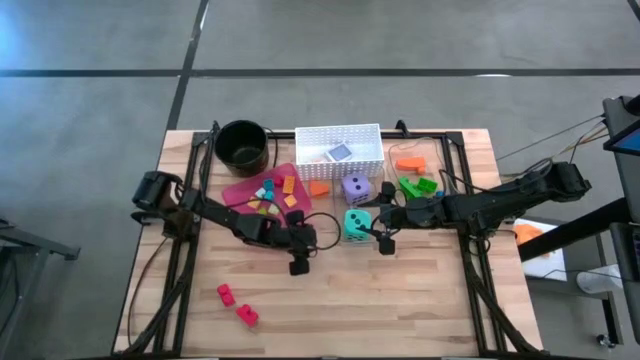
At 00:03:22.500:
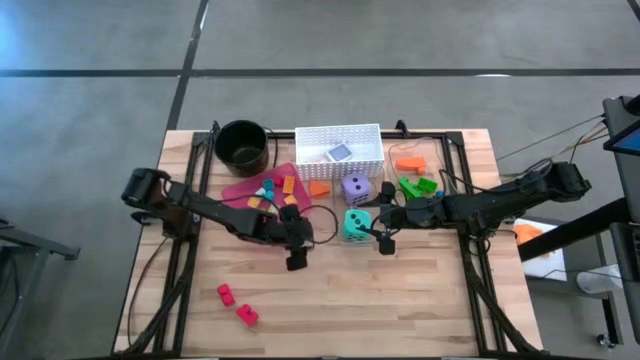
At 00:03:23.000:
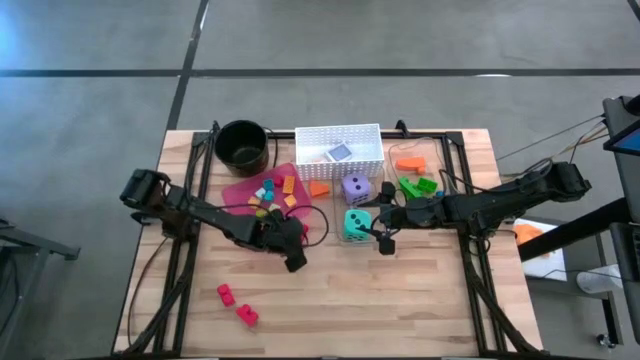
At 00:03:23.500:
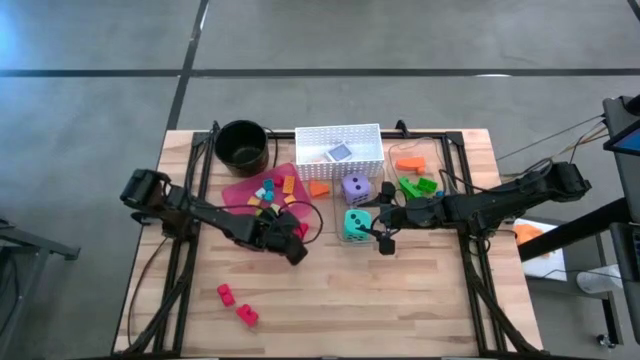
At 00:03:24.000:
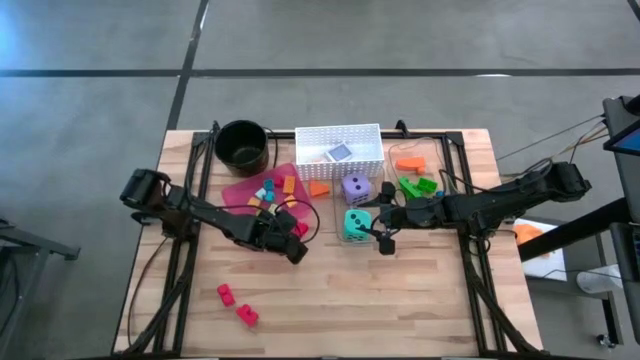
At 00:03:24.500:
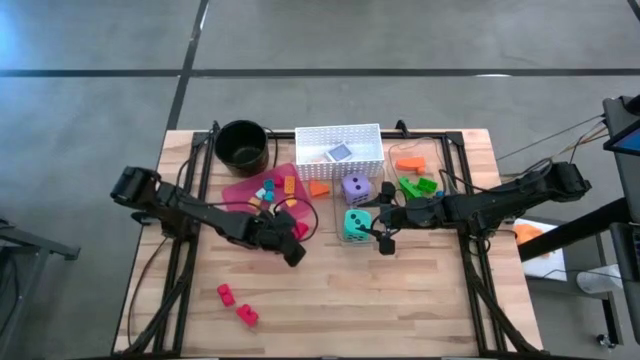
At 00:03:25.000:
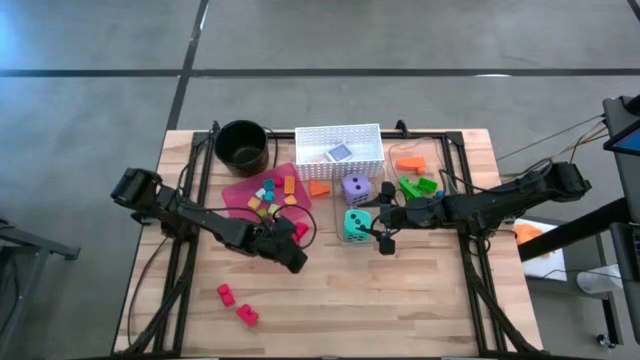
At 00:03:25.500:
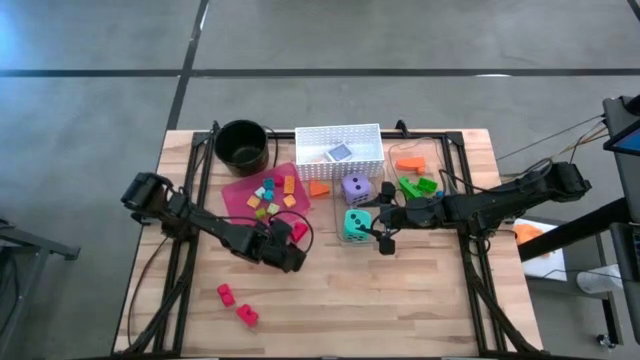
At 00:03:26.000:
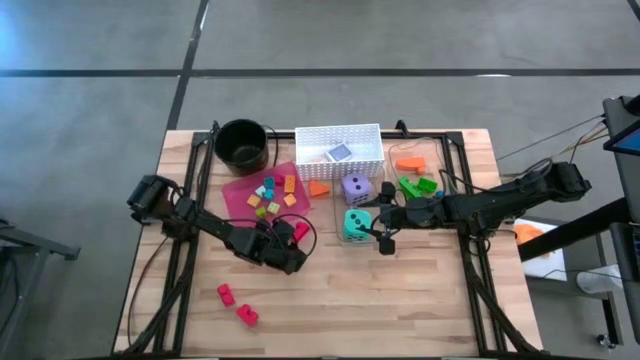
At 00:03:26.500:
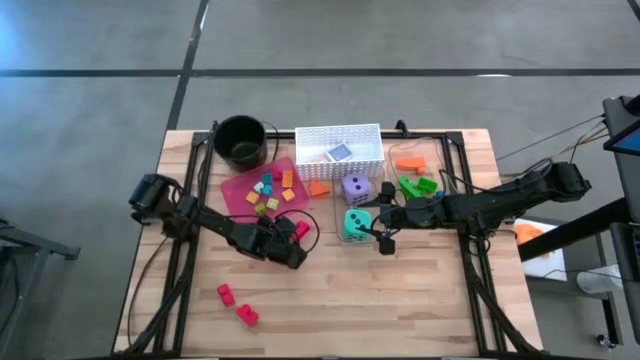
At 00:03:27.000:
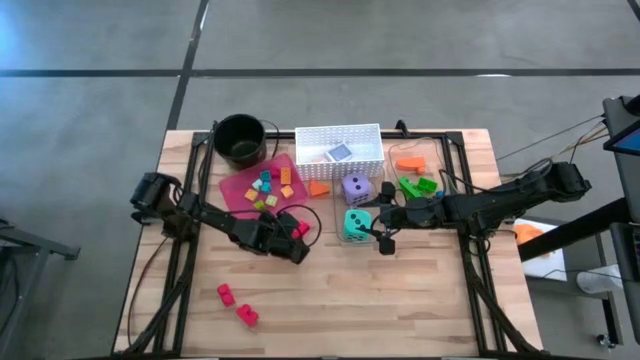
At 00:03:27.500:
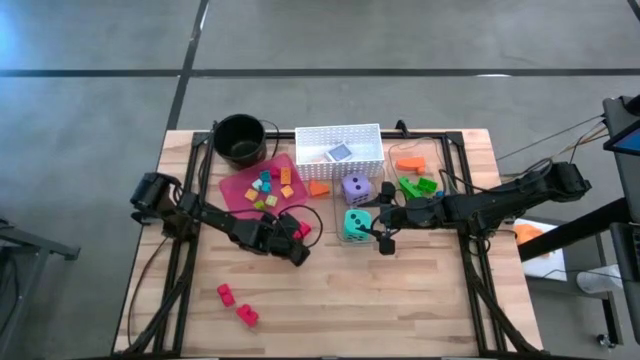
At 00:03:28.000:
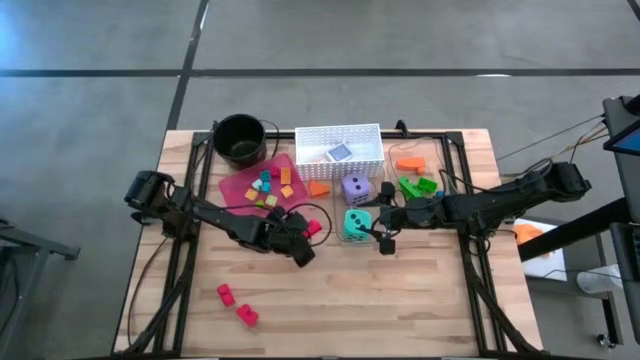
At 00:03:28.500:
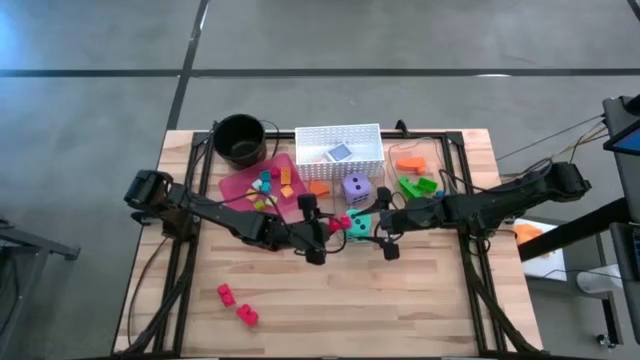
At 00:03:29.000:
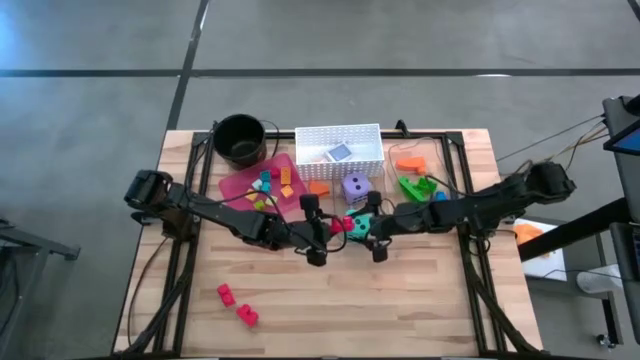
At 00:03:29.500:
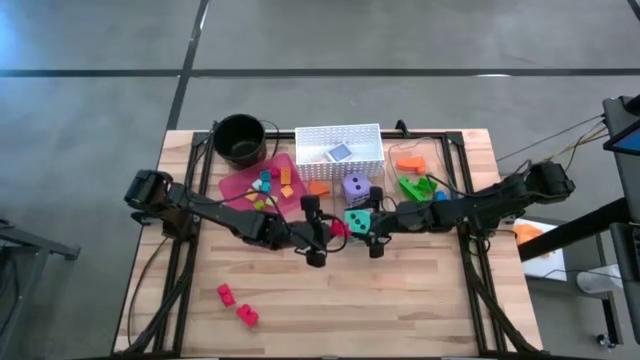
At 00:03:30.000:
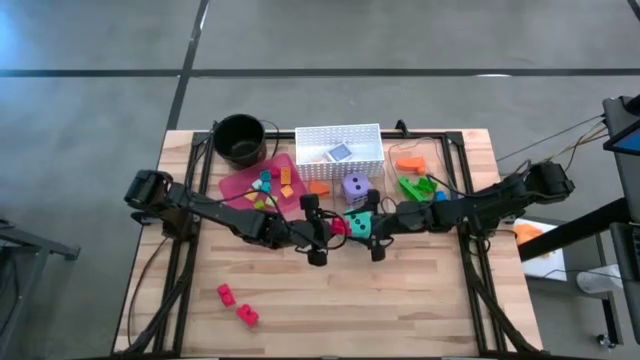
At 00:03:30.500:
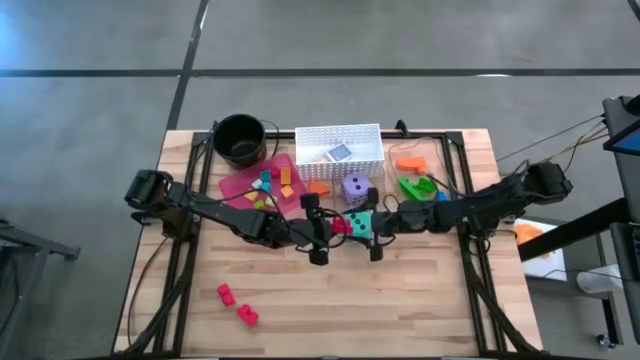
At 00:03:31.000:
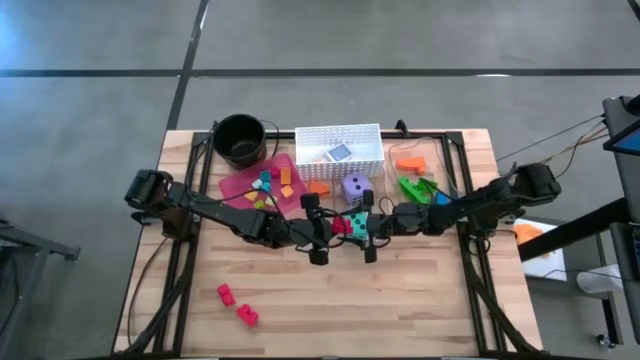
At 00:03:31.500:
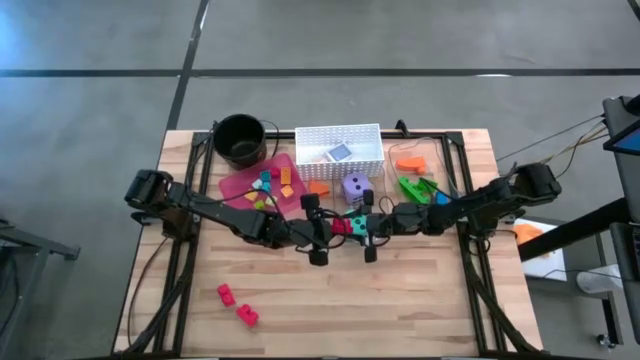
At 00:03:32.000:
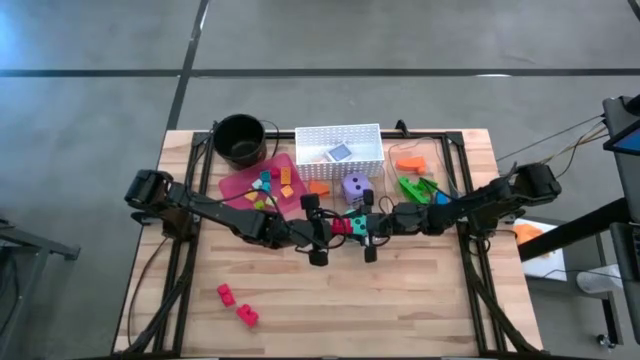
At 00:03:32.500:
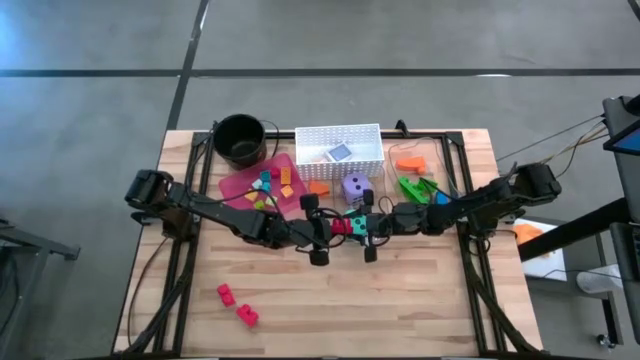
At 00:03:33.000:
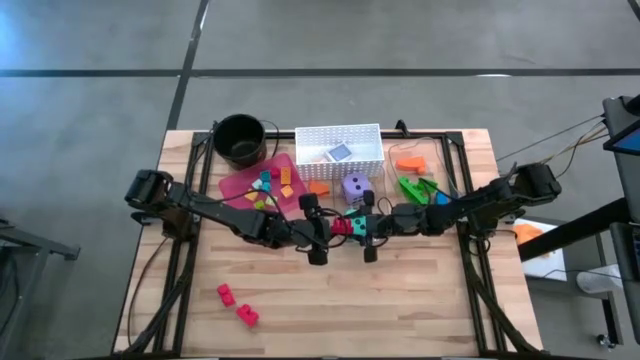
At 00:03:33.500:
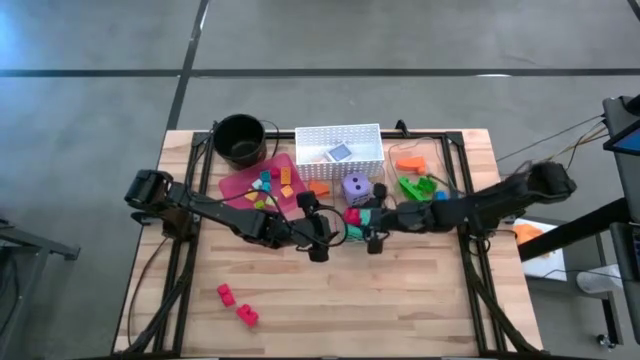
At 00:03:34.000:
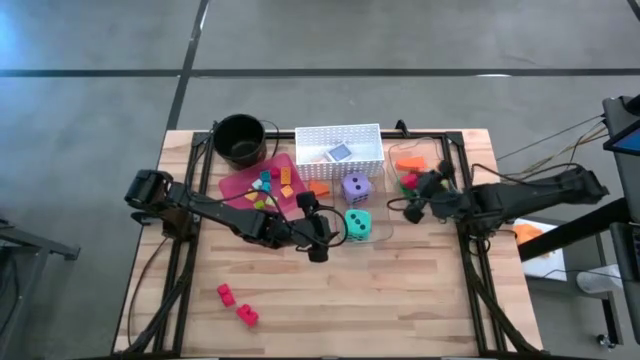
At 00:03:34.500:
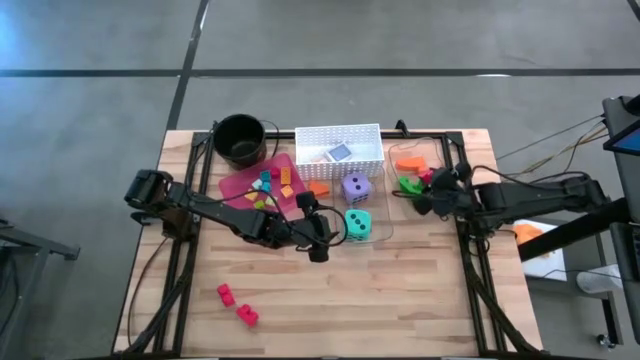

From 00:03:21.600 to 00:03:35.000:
Task: Pick & Place Toys
Put the top large red game piece into the top transparent bin

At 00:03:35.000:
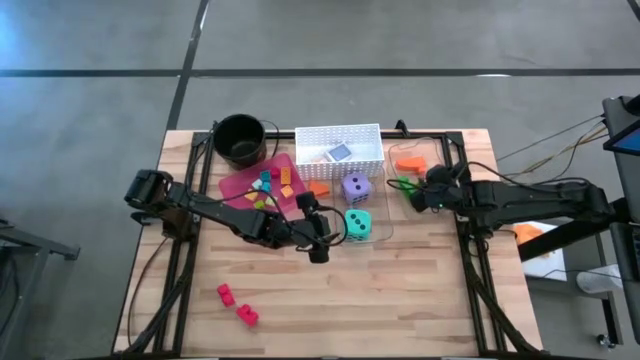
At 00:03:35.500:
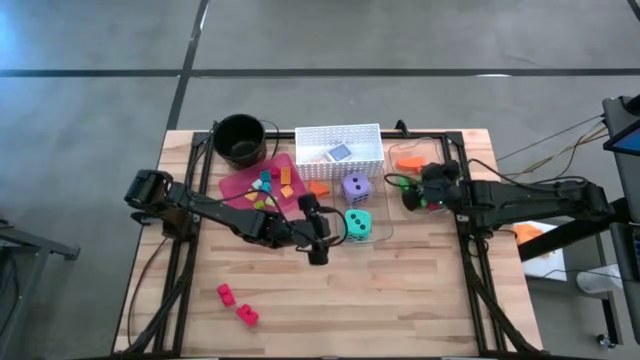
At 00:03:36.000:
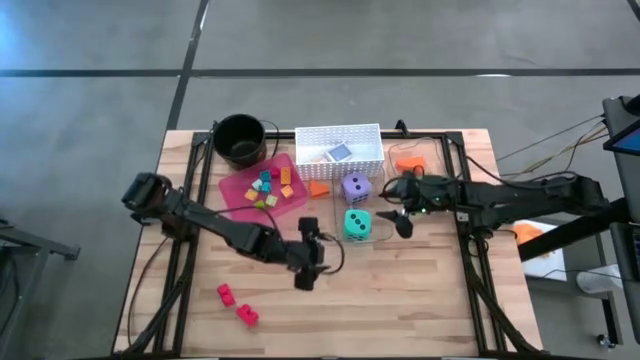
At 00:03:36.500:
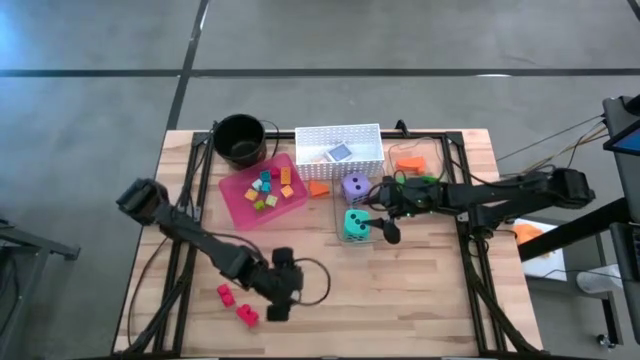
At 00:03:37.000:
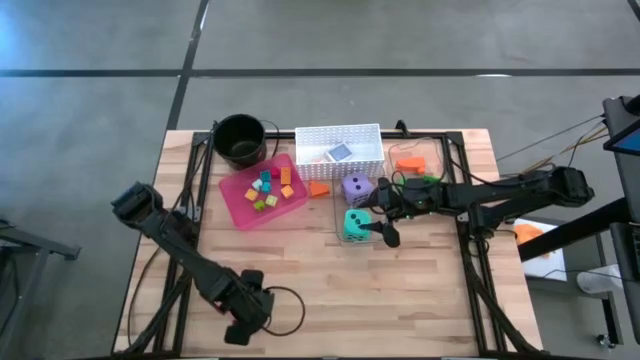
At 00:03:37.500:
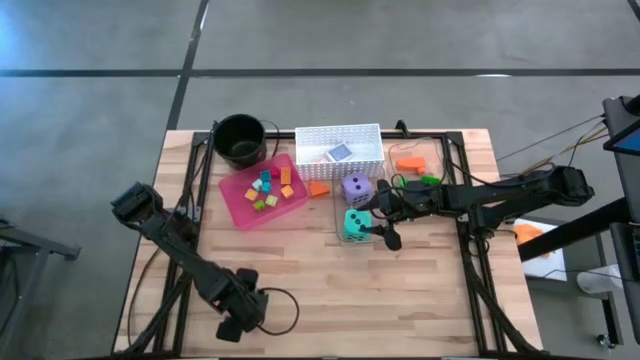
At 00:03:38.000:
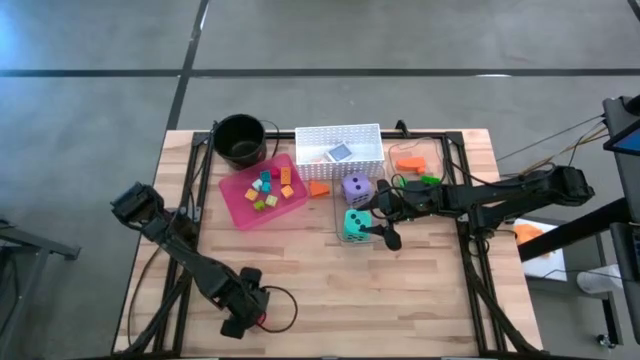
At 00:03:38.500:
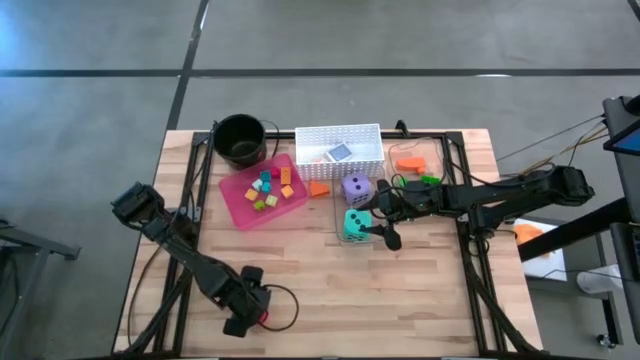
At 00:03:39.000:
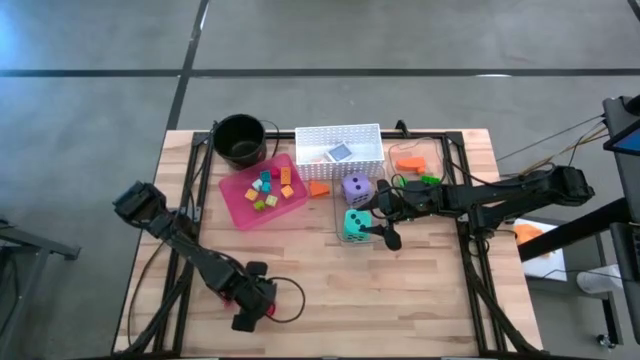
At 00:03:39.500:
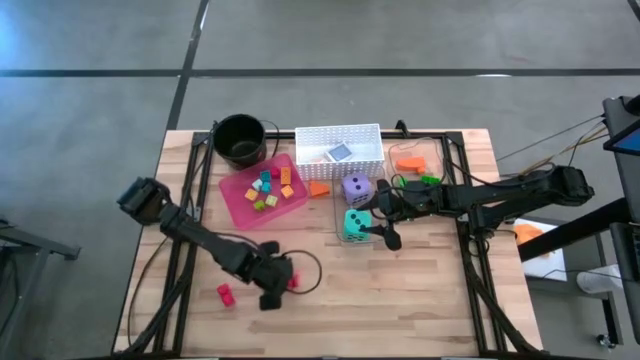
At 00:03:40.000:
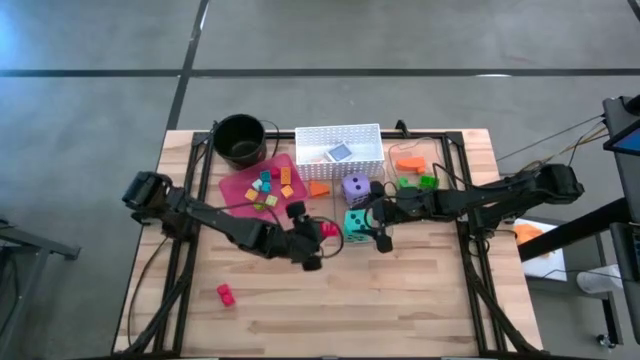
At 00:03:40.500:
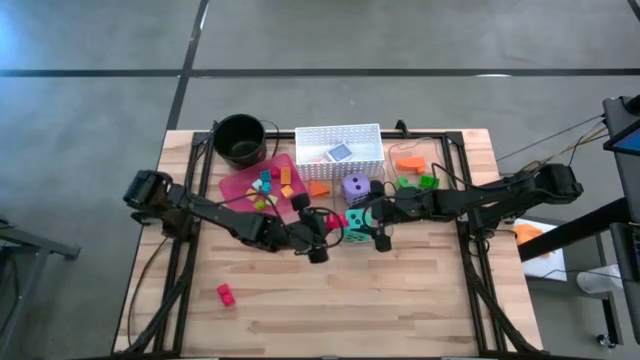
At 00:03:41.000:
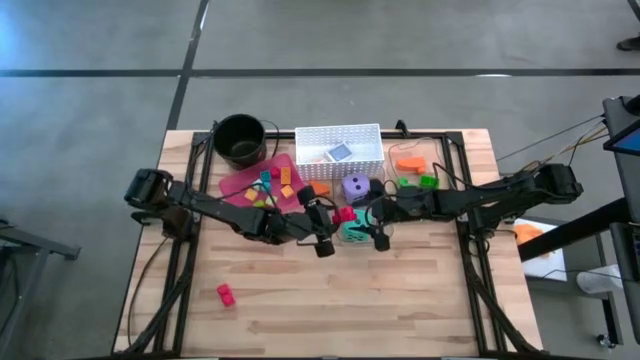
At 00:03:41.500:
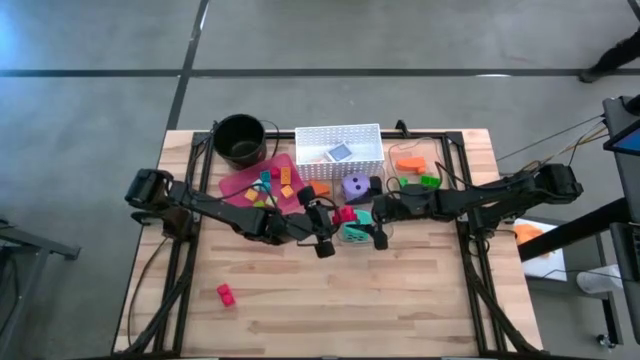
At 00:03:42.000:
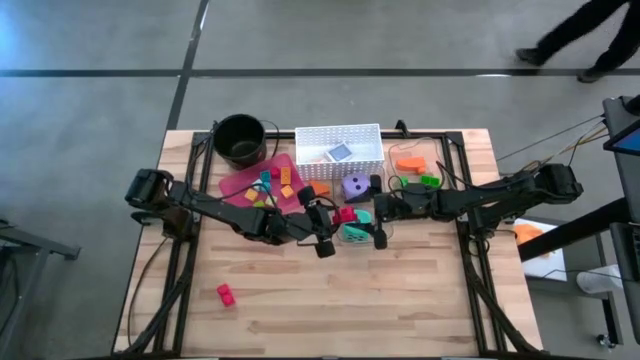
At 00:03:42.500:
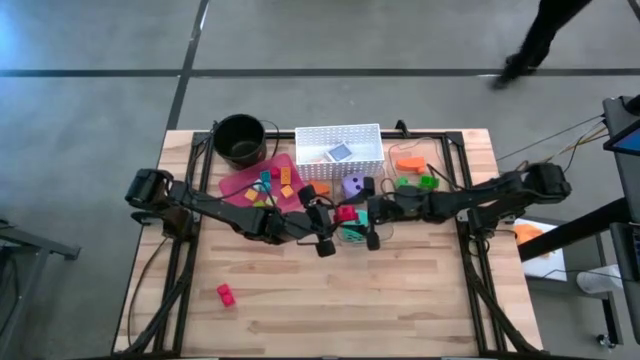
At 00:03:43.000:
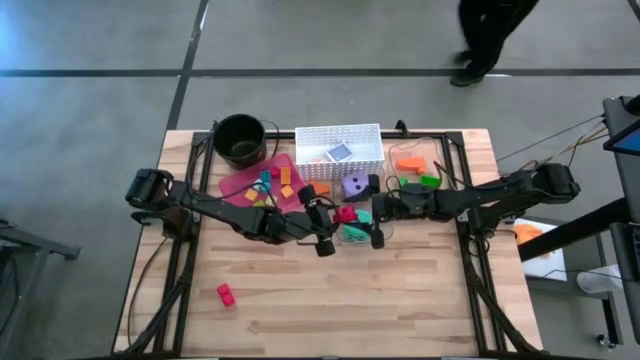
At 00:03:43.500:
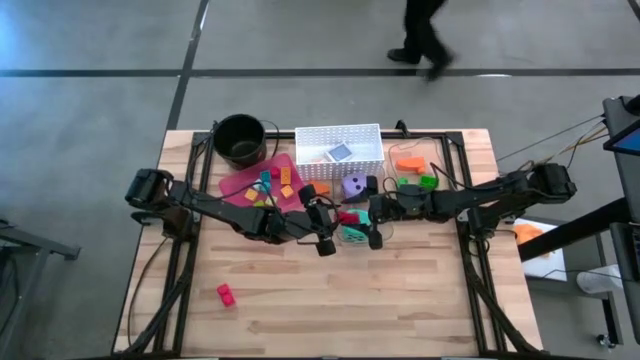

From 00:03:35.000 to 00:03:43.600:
Put the bottom large red game piece into the top transparent bin
